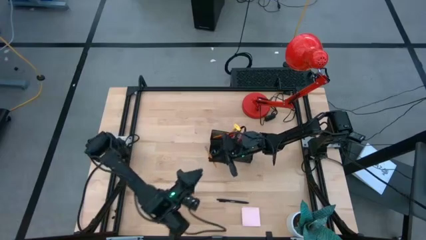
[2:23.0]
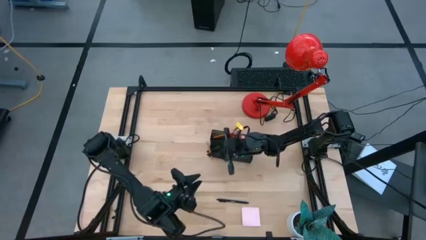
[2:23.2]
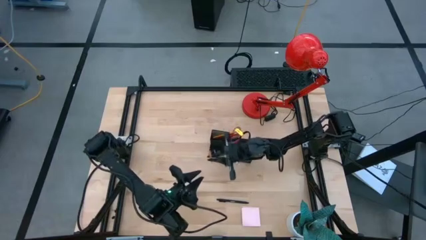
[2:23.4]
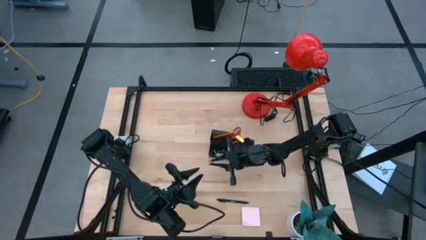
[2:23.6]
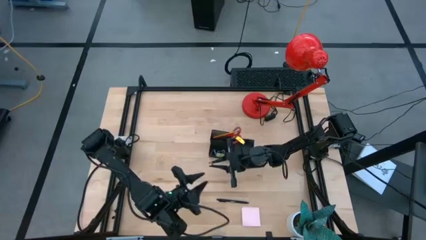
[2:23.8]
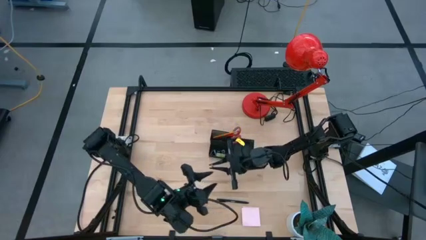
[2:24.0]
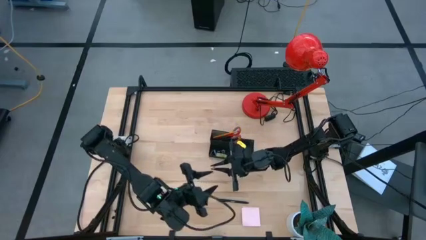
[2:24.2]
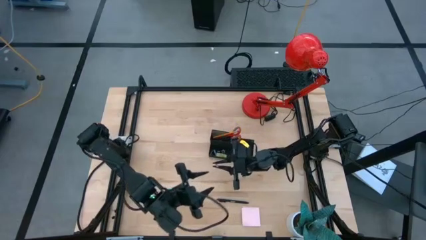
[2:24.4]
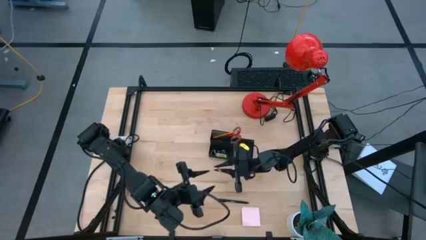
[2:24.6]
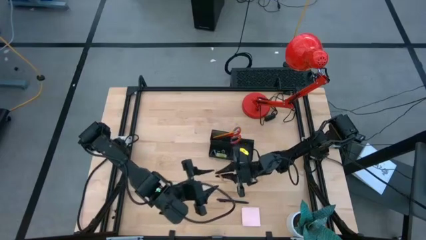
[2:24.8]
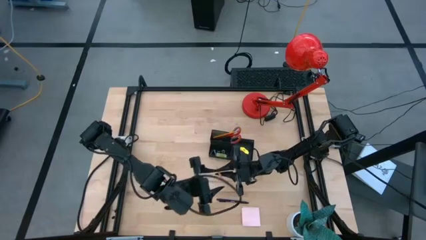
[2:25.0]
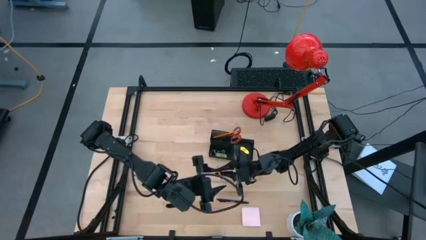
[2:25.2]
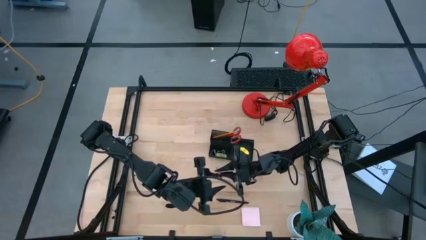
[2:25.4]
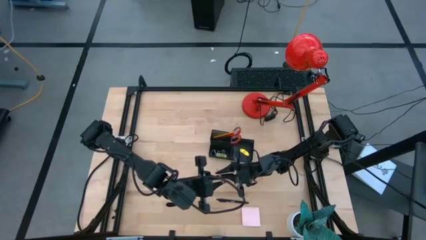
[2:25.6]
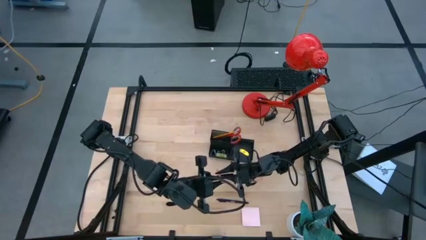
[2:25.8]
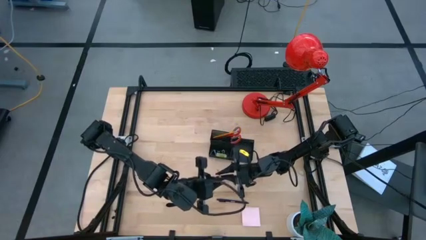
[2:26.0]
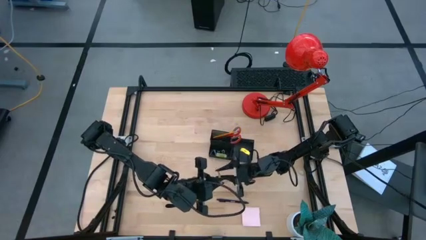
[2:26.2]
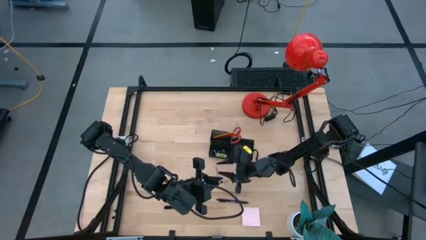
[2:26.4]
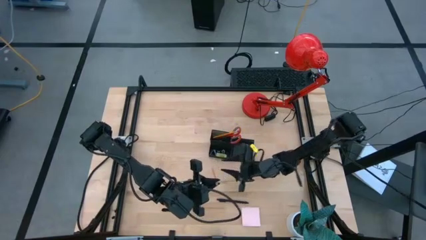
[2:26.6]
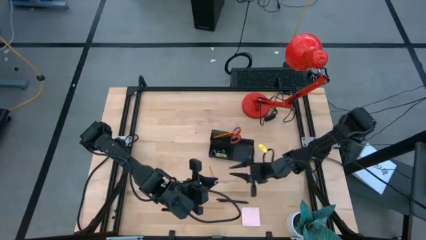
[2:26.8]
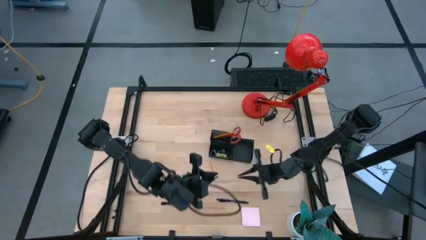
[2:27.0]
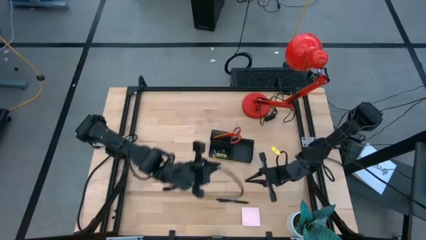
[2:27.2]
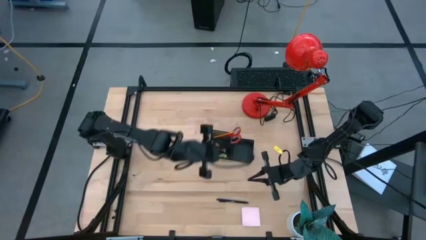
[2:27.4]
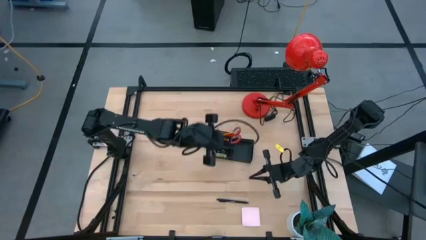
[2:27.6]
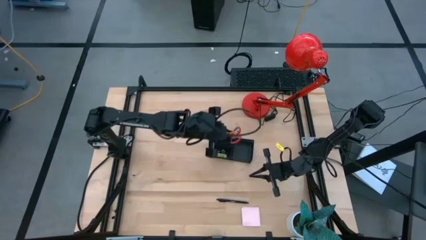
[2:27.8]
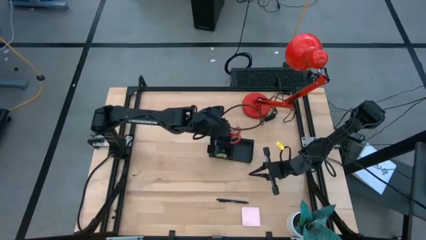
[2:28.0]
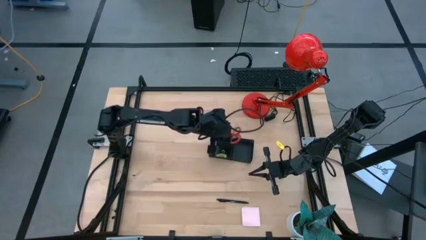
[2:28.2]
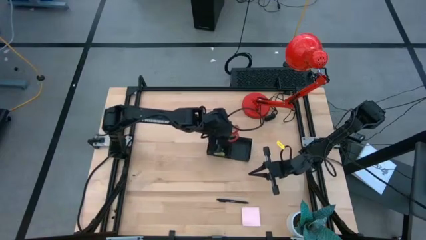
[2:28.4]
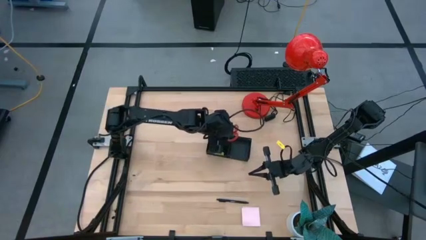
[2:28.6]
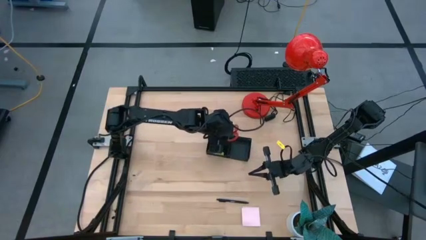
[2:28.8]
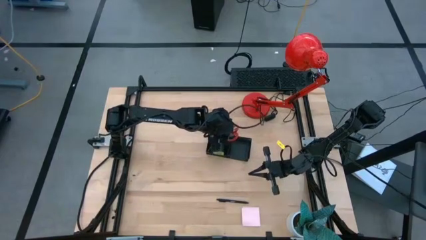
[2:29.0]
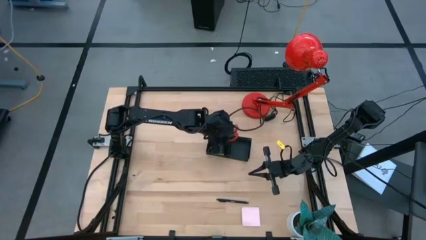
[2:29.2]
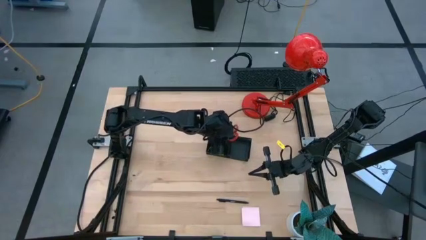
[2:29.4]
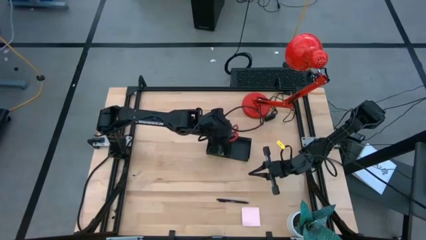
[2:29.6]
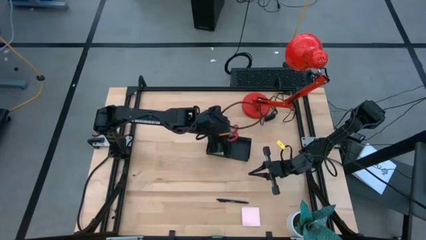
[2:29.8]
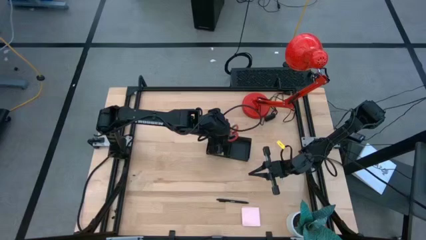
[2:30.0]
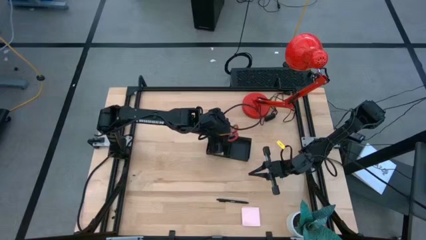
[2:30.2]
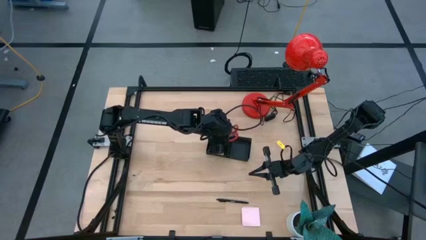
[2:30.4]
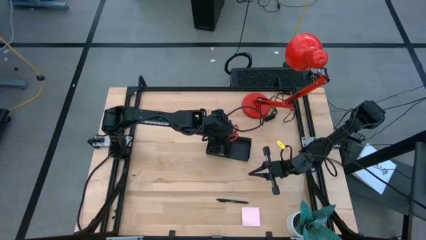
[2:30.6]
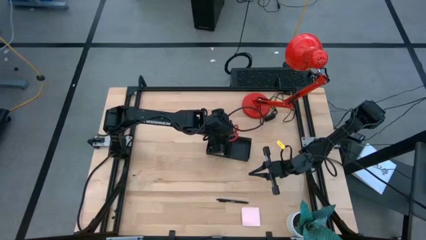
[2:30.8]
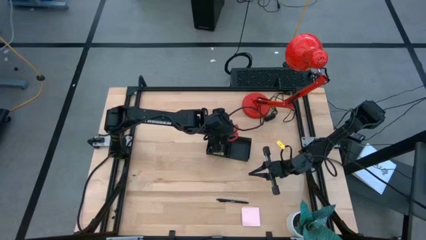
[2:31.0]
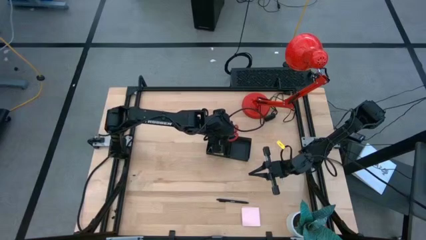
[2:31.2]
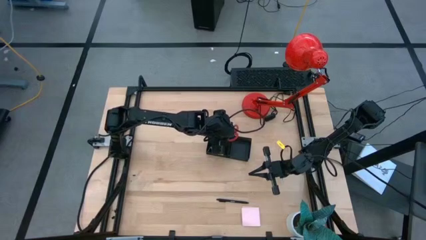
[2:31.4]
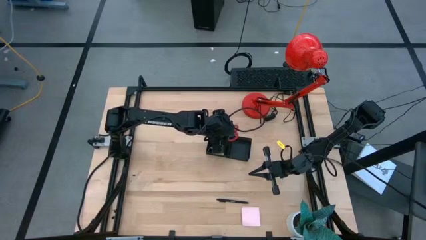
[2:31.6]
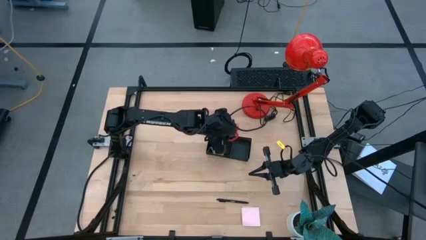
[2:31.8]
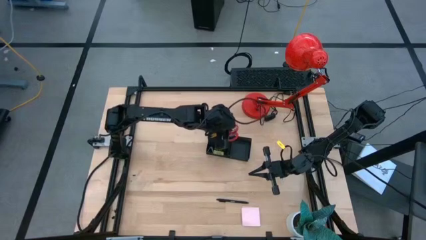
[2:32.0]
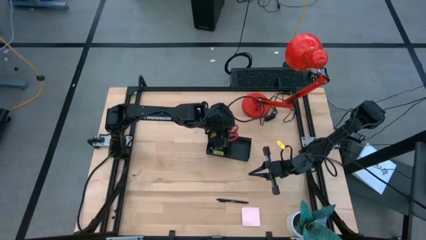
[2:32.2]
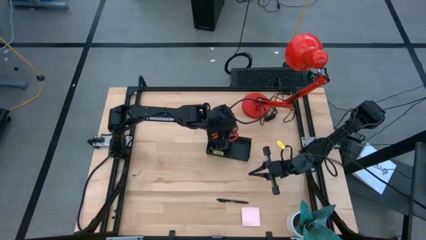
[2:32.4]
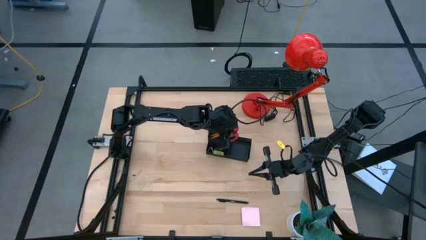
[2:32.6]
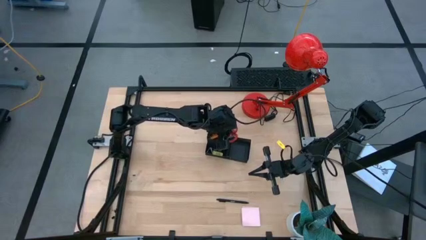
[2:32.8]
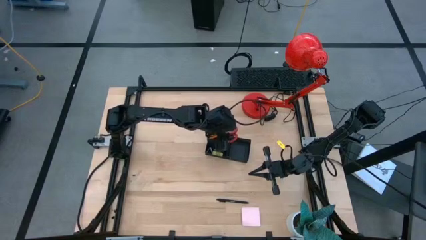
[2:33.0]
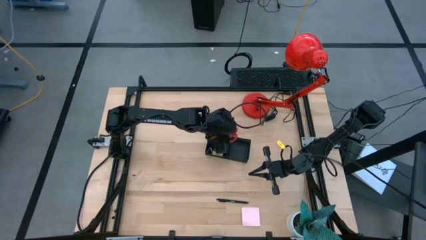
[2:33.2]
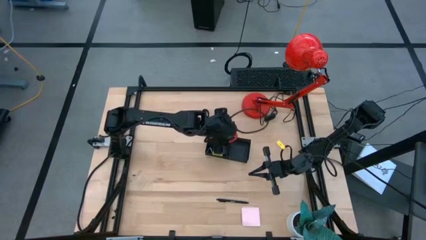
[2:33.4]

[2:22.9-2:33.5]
Task: Pick and place office supplies into organizer
Put the right yellow pencil into the black desk organizer
